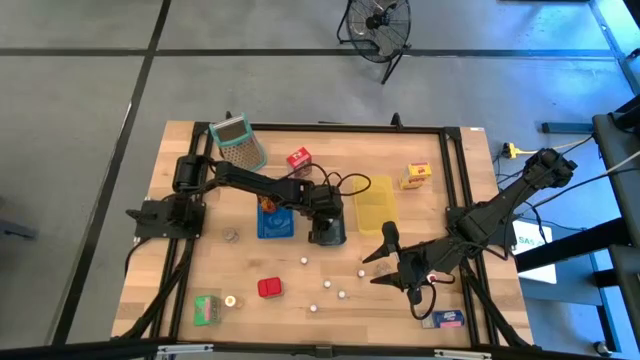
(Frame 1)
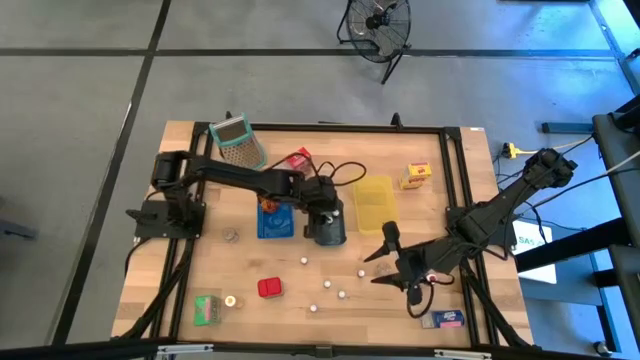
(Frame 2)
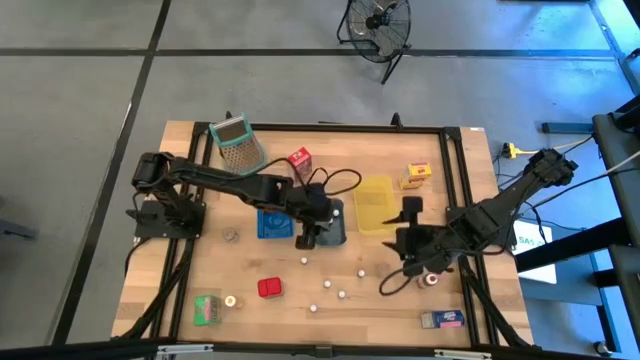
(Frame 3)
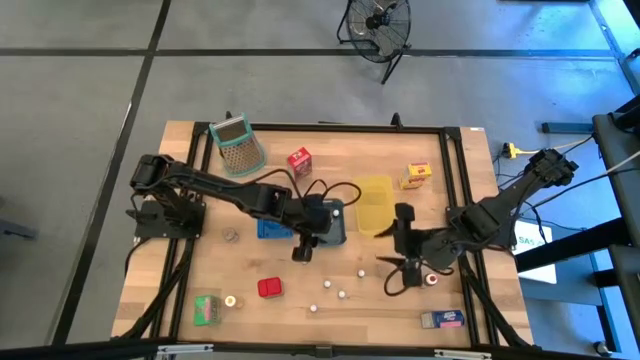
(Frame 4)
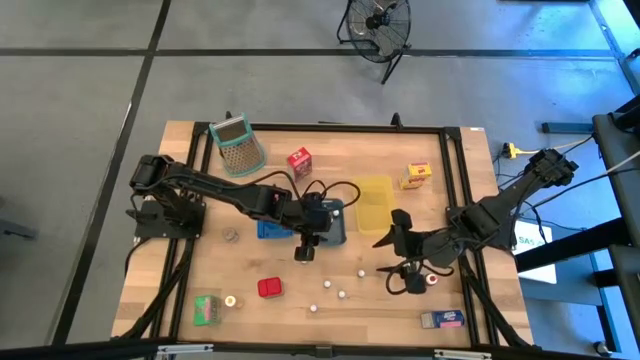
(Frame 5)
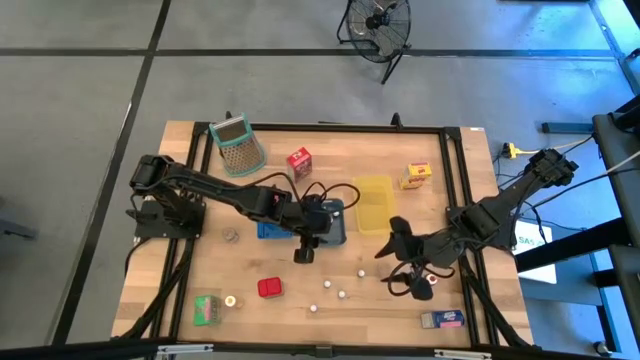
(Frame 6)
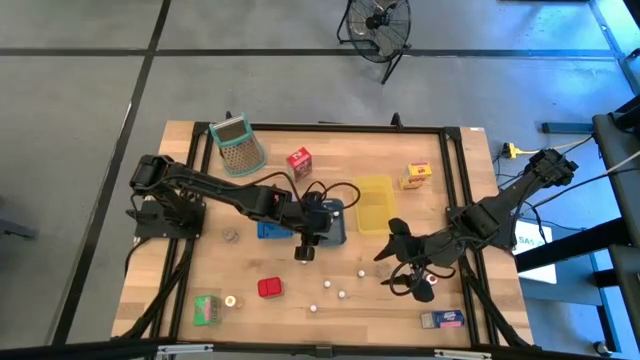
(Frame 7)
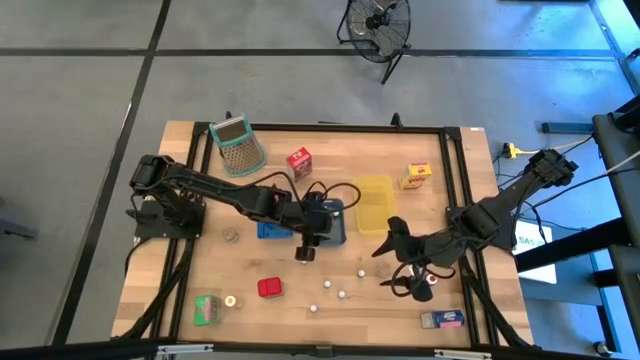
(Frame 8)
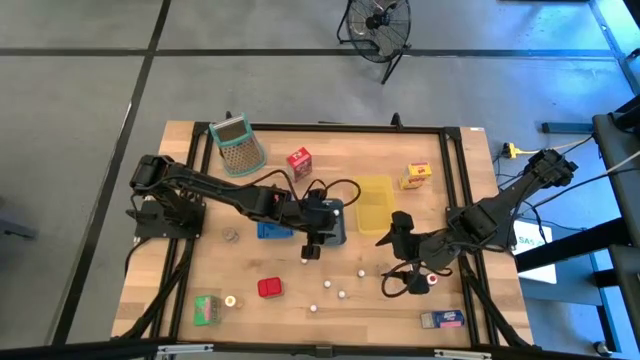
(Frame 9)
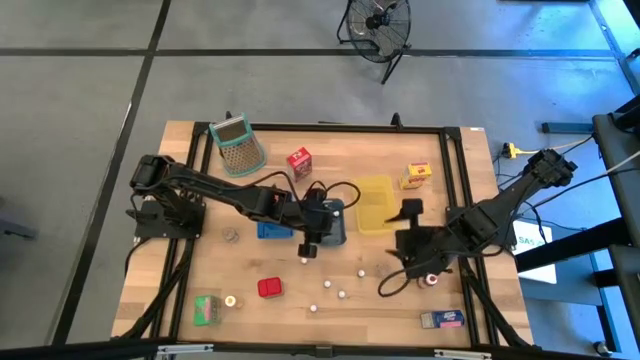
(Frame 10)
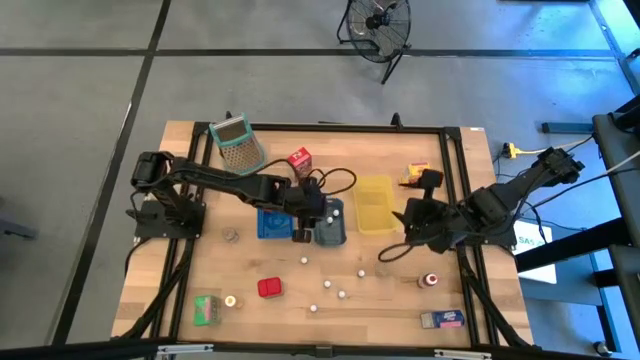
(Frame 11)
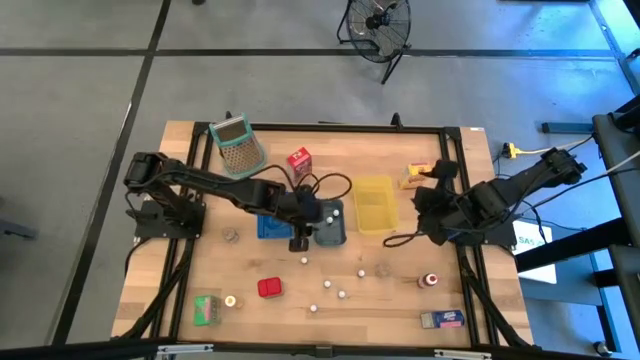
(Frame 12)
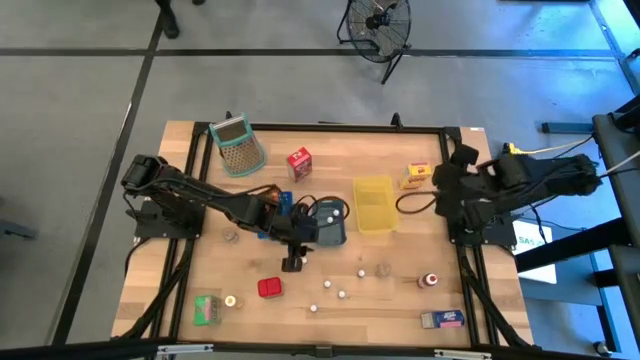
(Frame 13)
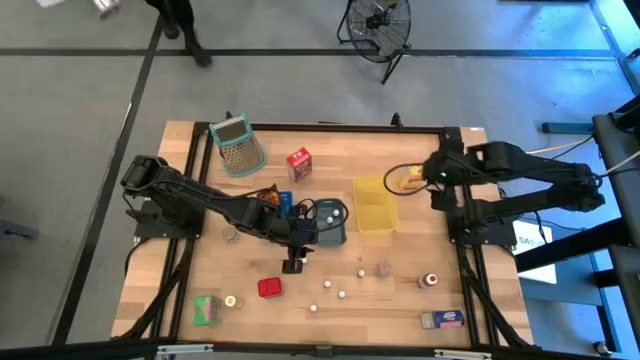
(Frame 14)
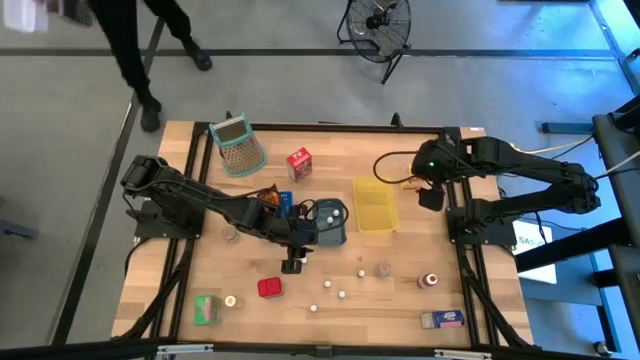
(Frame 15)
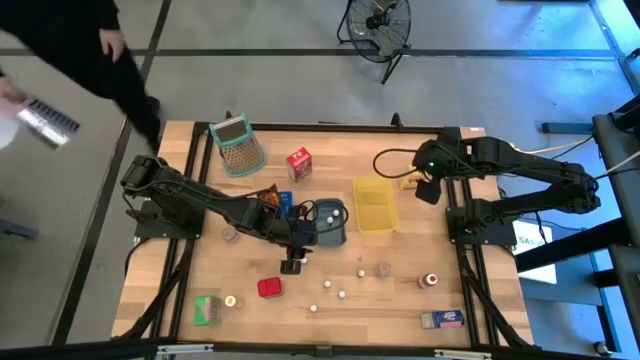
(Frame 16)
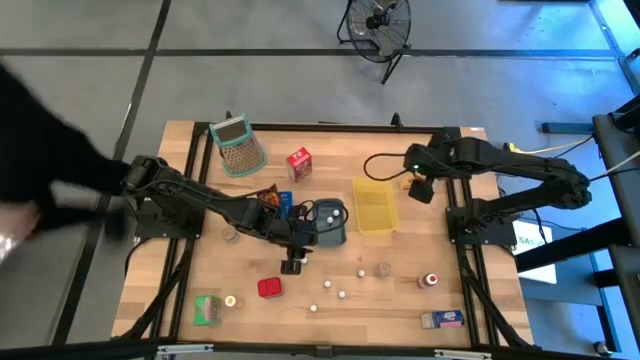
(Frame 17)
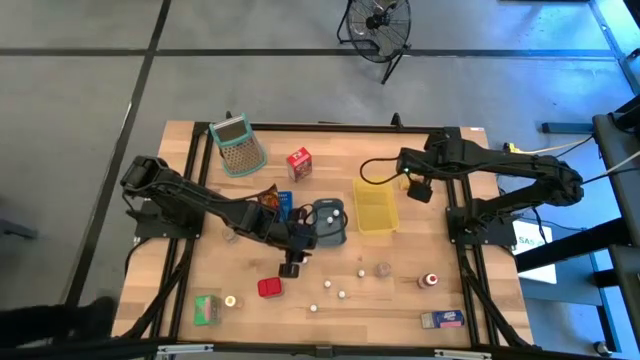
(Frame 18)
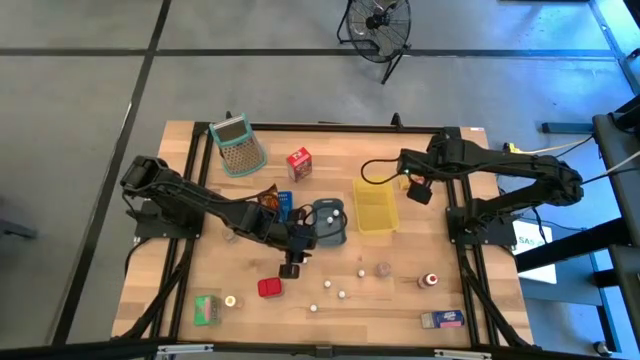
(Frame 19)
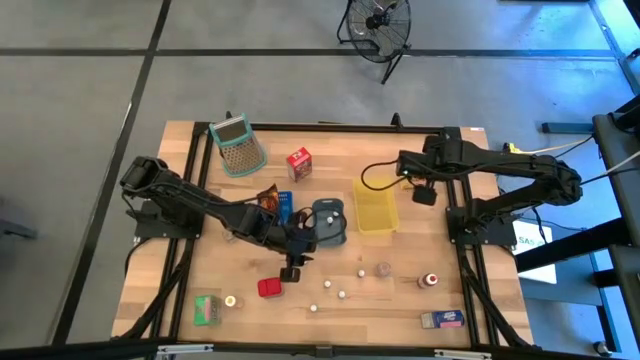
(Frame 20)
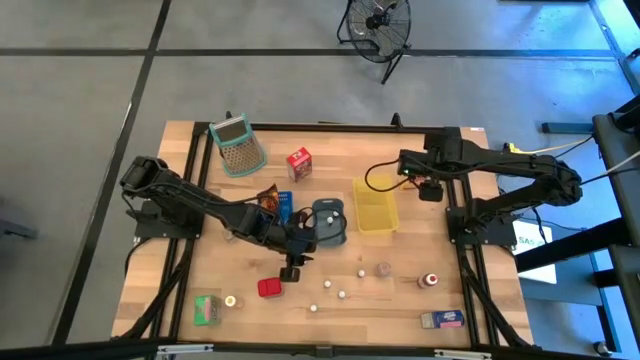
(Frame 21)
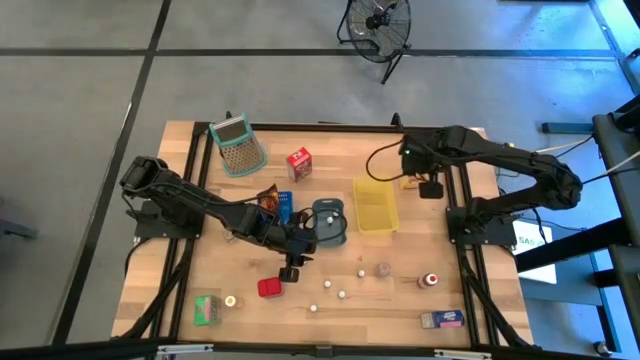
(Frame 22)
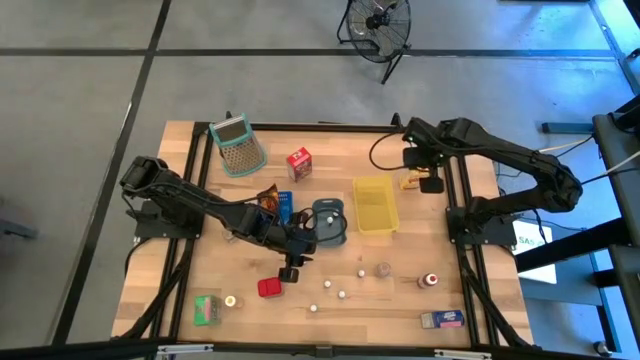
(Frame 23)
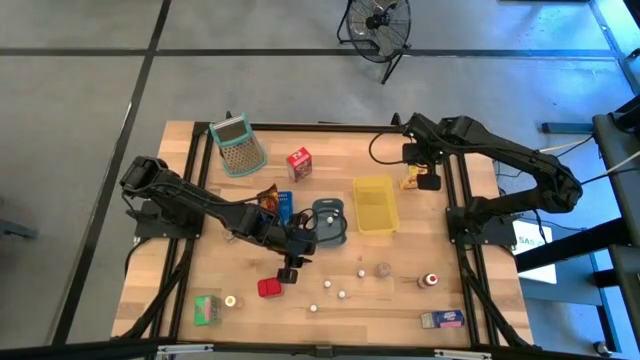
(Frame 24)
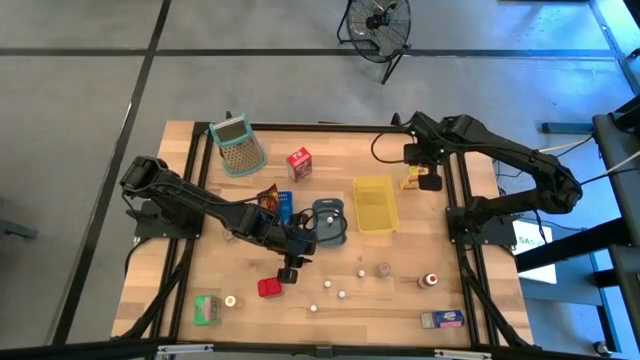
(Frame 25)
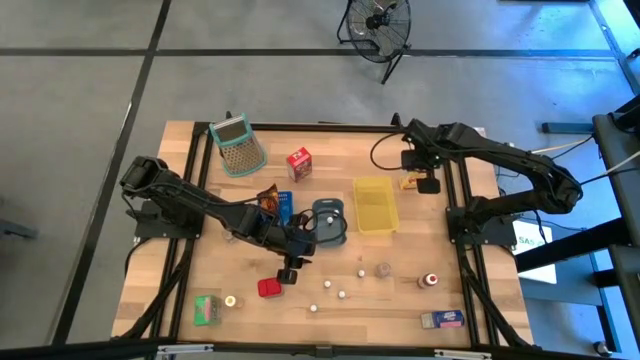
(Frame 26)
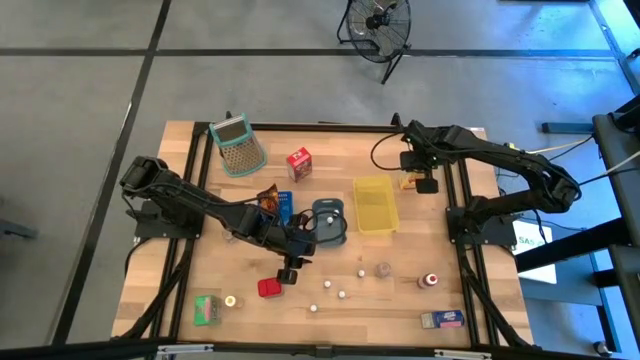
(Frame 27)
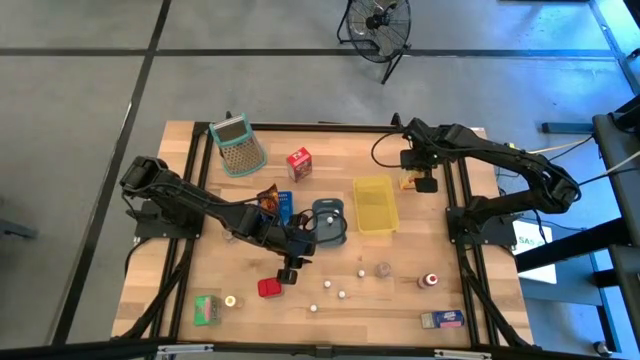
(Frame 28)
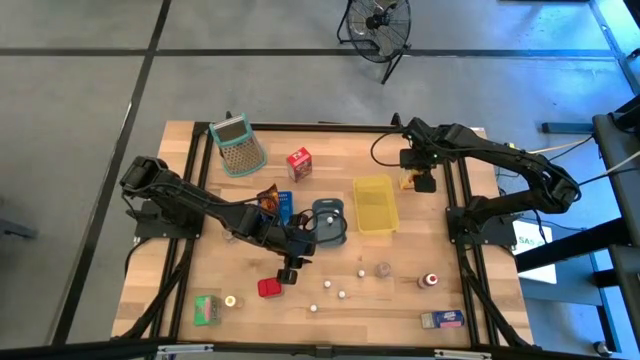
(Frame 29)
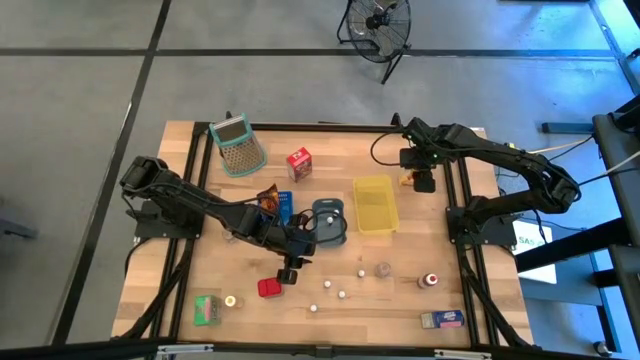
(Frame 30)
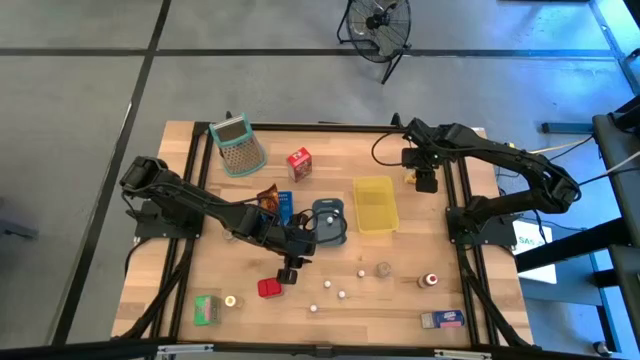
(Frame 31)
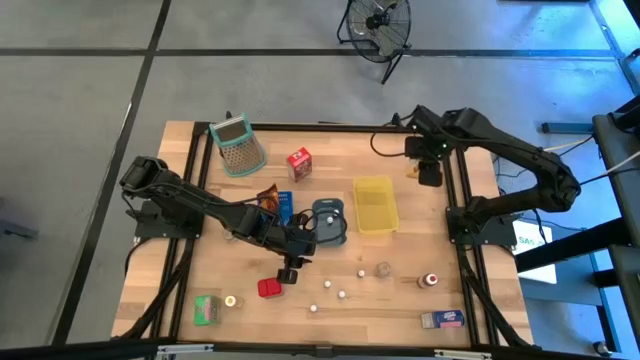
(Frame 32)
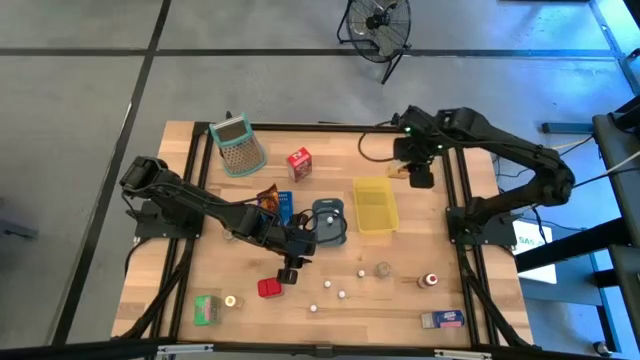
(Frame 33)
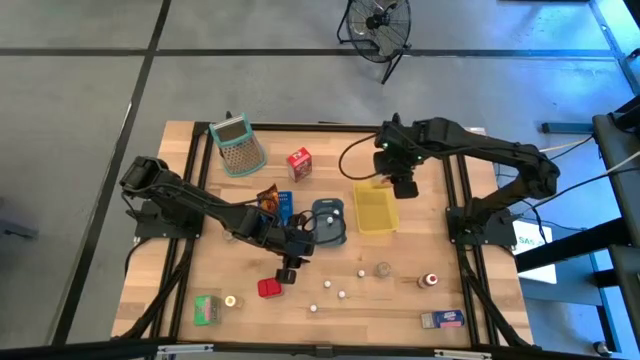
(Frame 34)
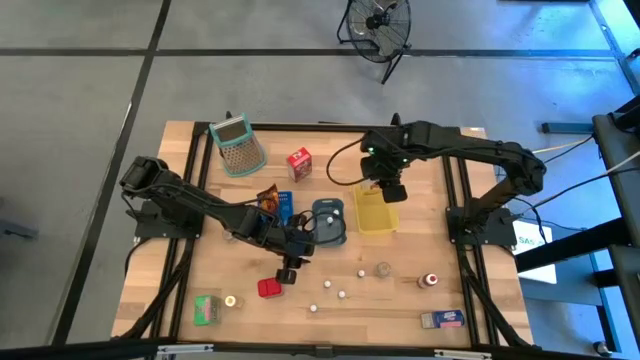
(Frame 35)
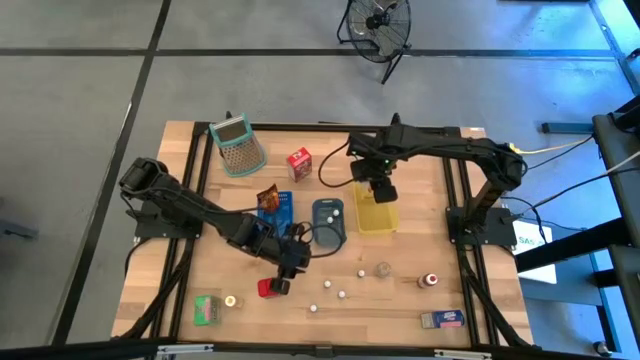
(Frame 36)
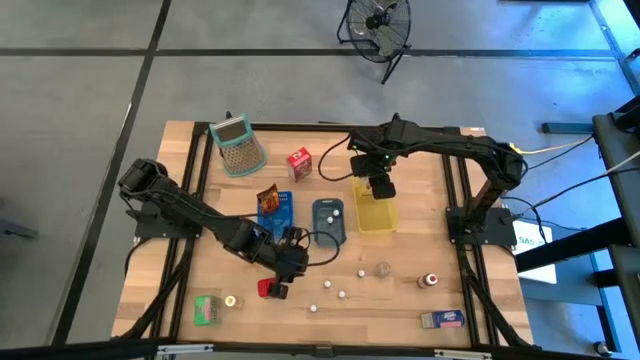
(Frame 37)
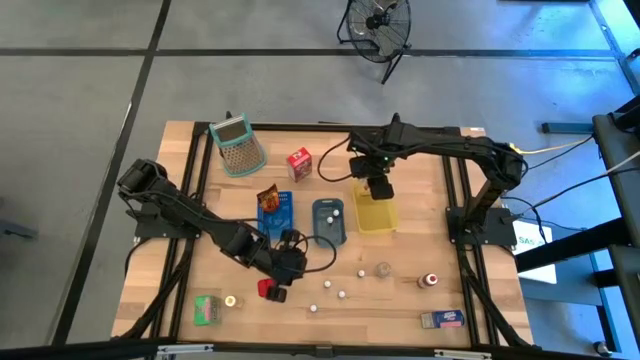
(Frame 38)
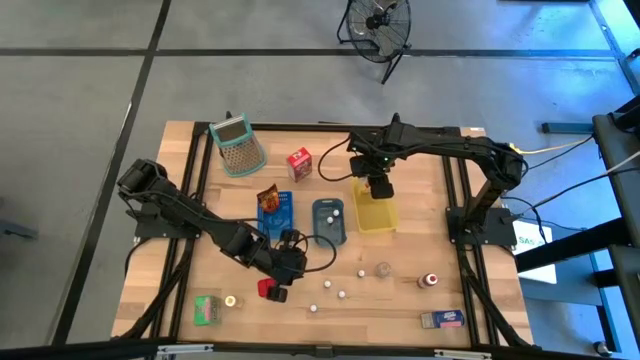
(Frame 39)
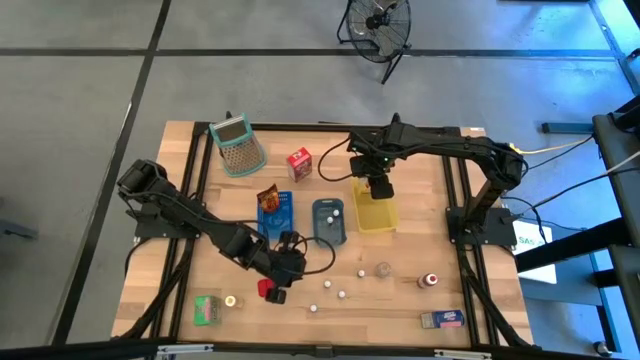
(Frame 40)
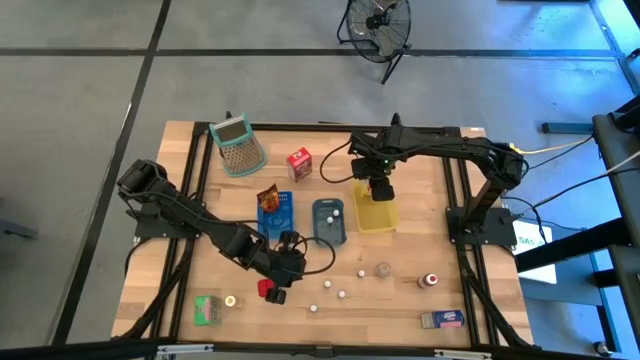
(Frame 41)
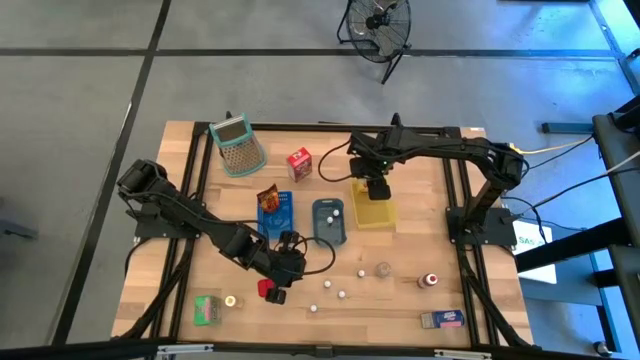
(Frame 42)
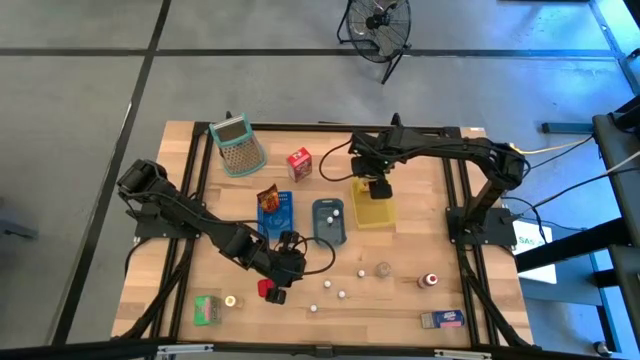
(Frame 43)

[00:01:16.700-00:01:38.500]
Task: Pick & Place Kitchen Items
Put the yellow cereal box into the yellow bin
